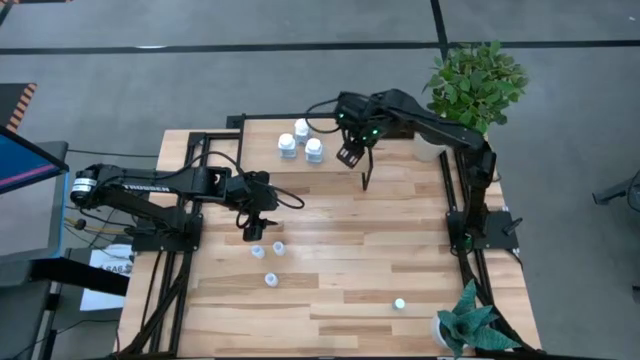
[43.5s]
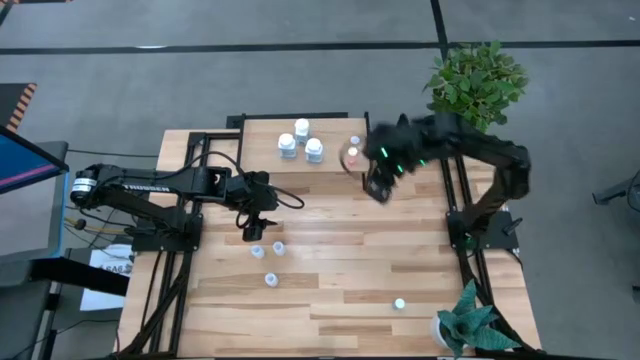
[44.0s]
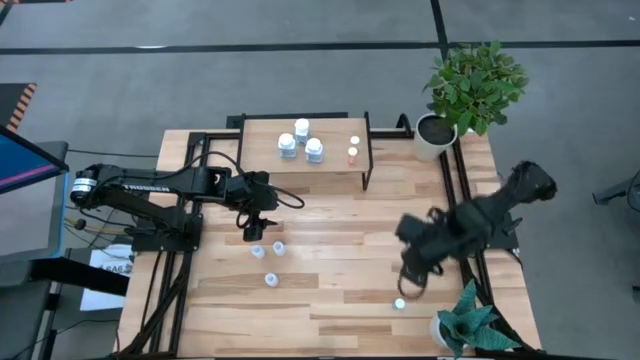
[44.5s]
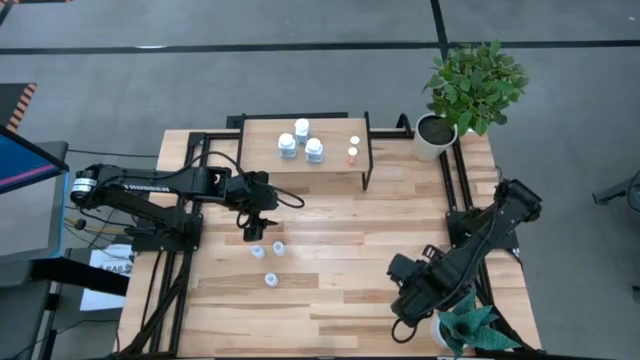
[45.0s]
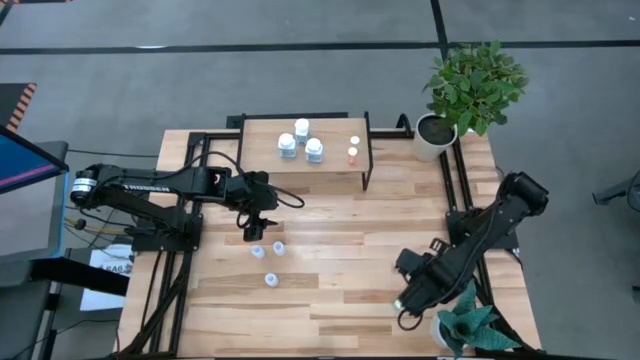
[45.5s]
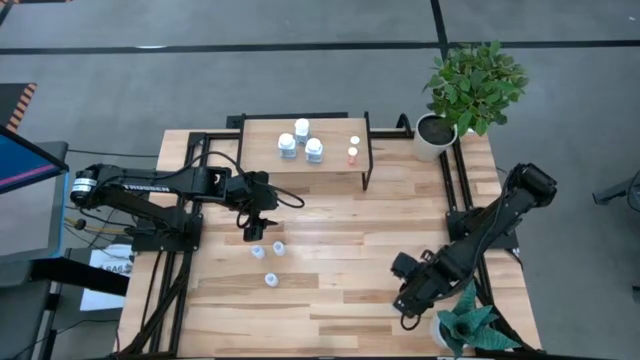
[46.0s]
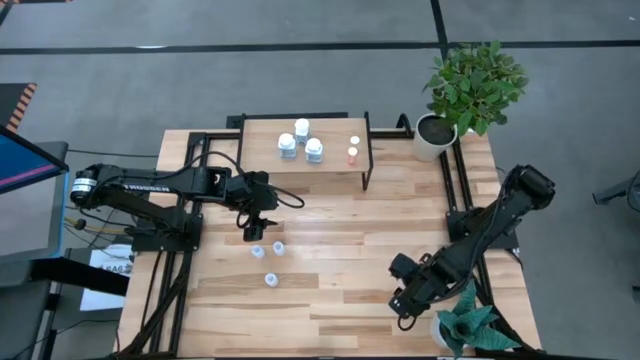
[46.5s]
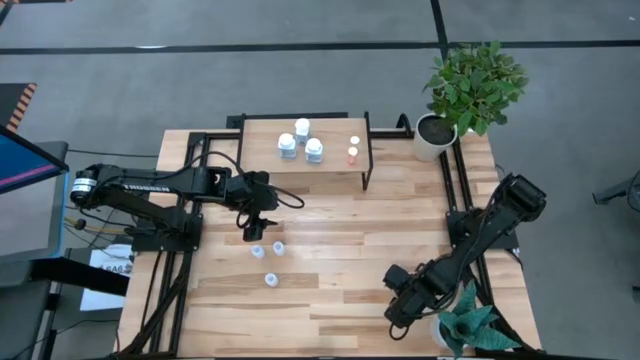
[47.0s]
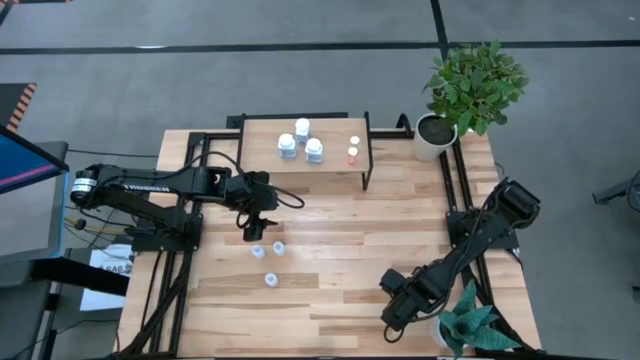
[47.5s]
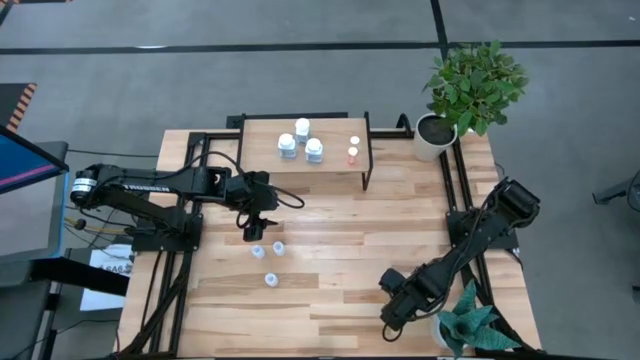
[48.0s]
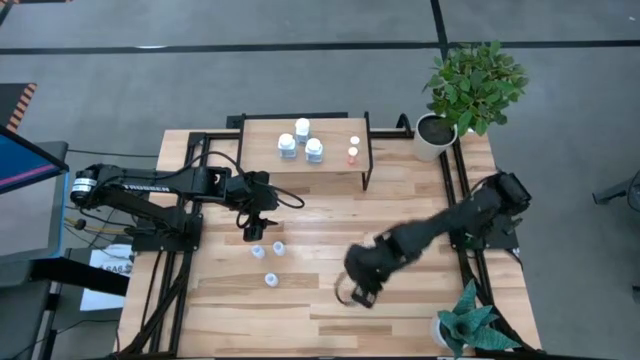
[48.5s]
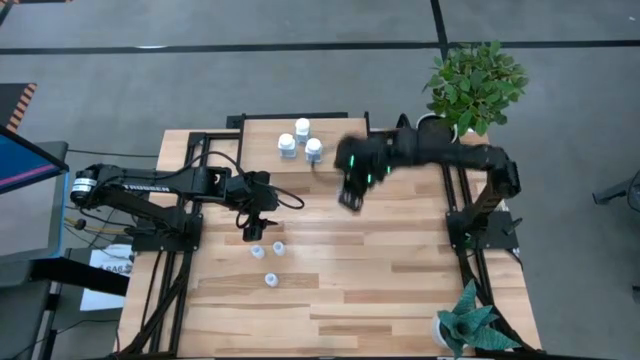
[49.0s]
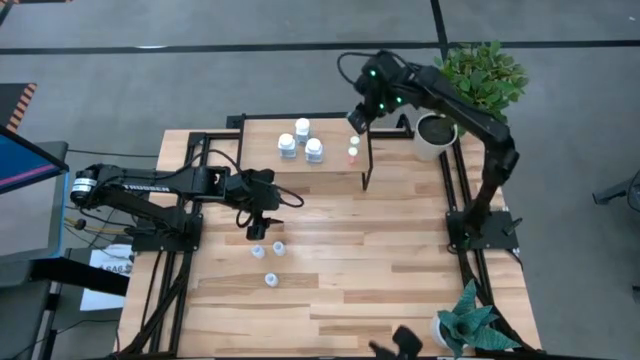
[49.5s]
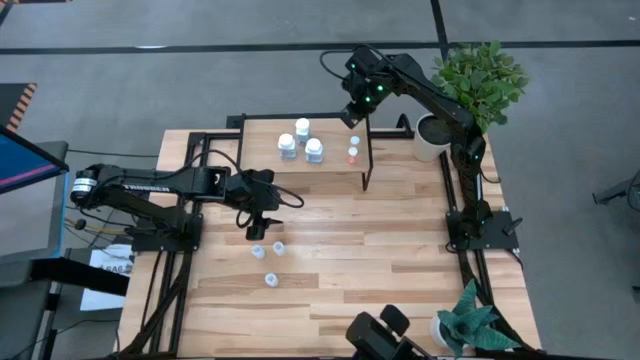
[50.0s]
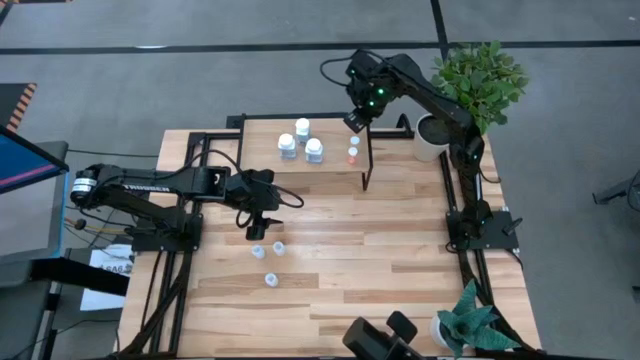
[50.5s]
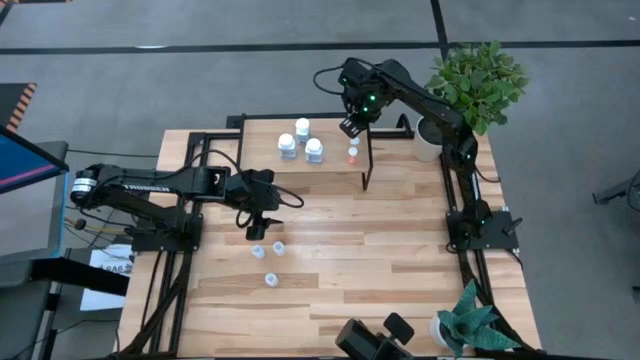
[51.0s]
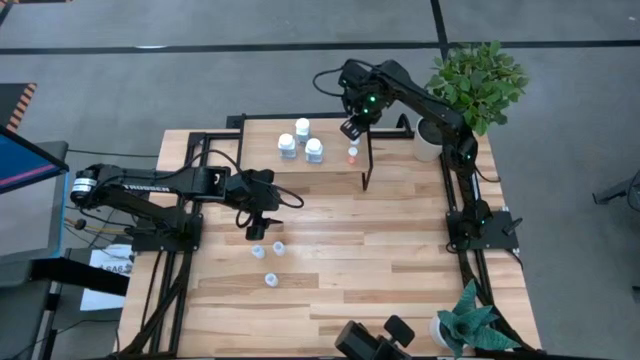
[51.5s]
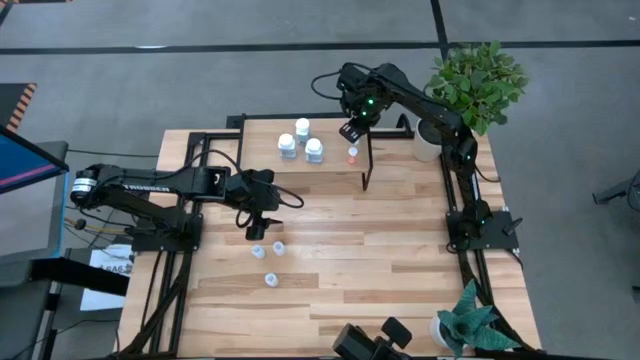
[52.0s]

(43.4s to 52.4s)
Task: Pick and place medicine bottles onto shelf by color
Put the blue pill bottle on the shelf

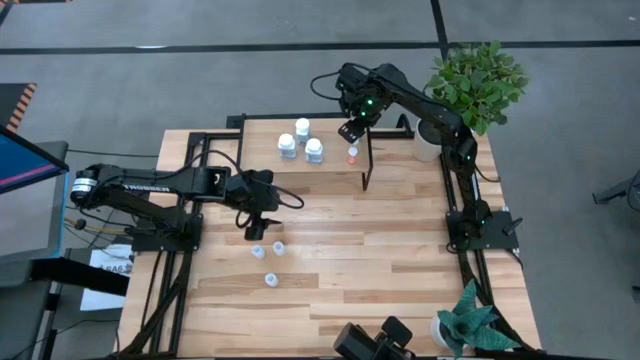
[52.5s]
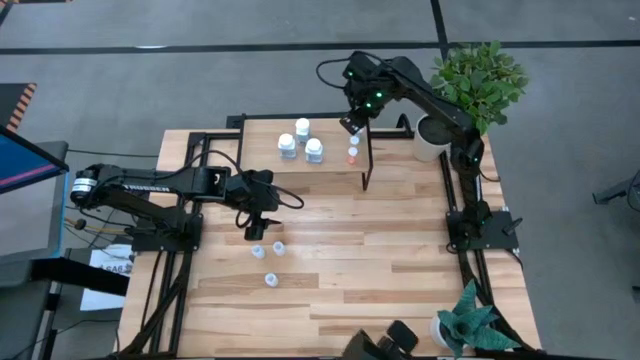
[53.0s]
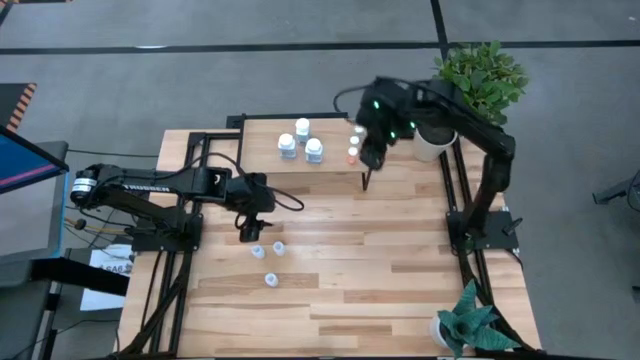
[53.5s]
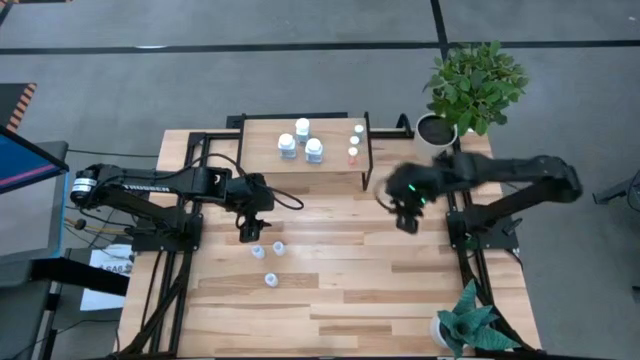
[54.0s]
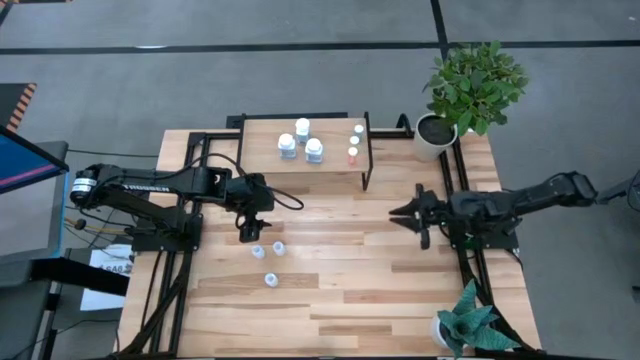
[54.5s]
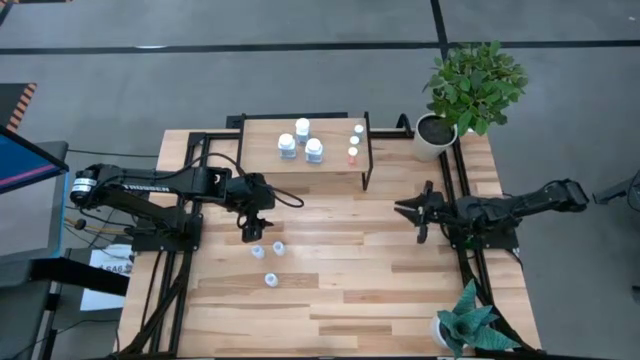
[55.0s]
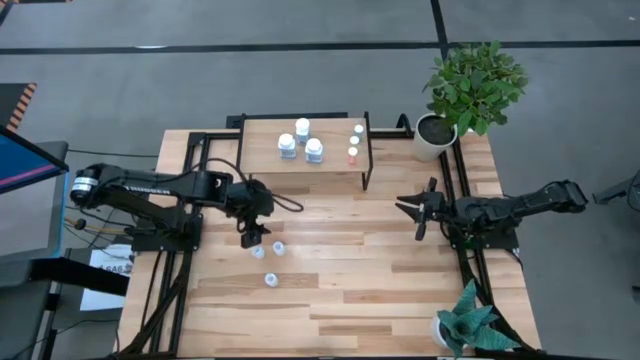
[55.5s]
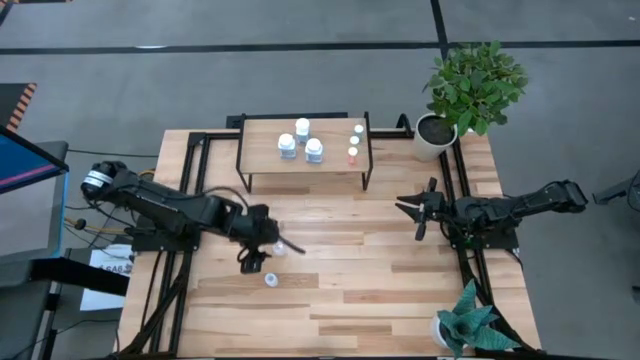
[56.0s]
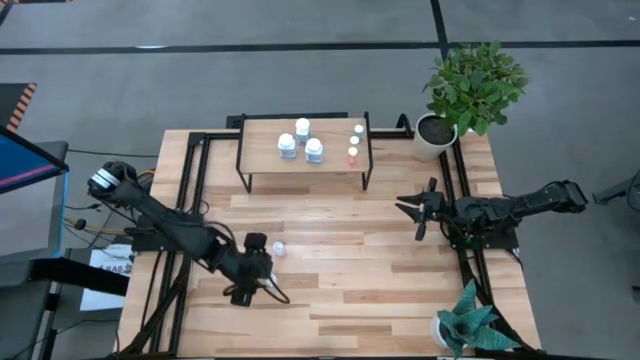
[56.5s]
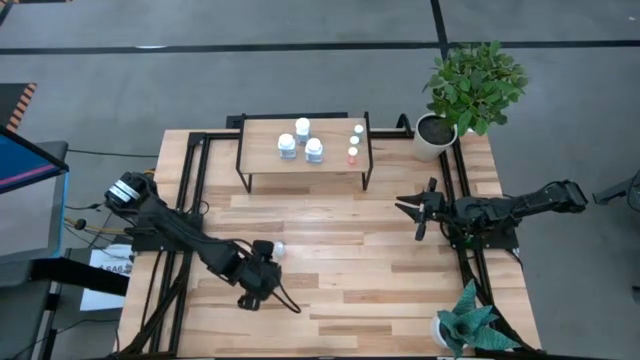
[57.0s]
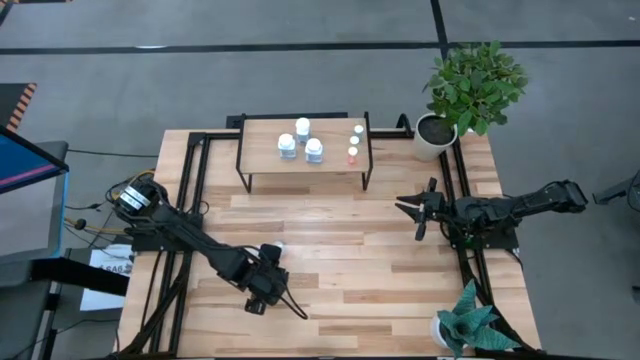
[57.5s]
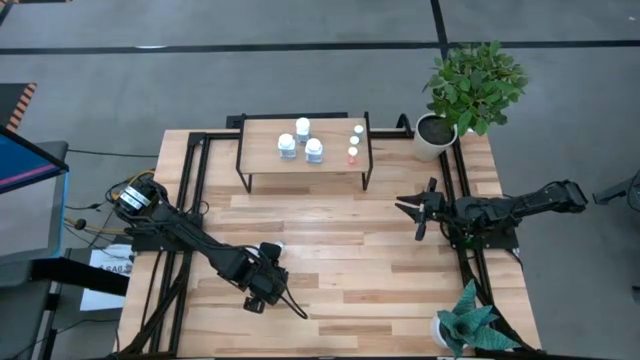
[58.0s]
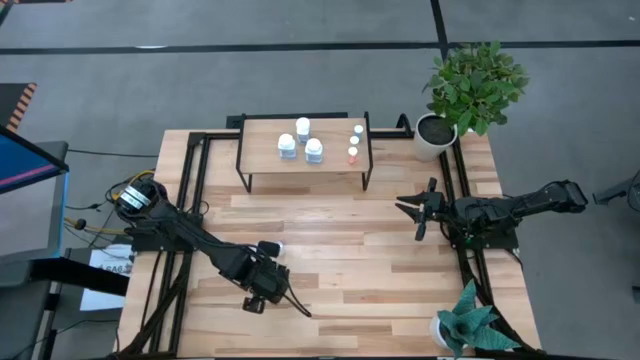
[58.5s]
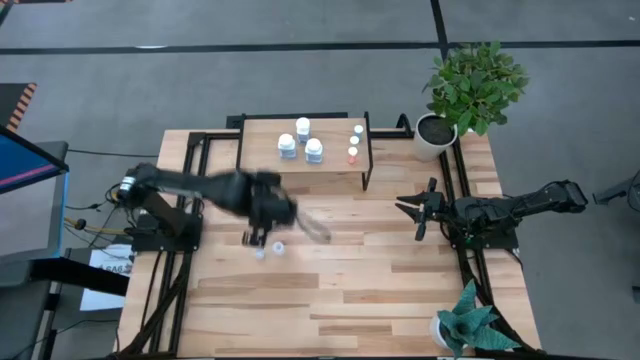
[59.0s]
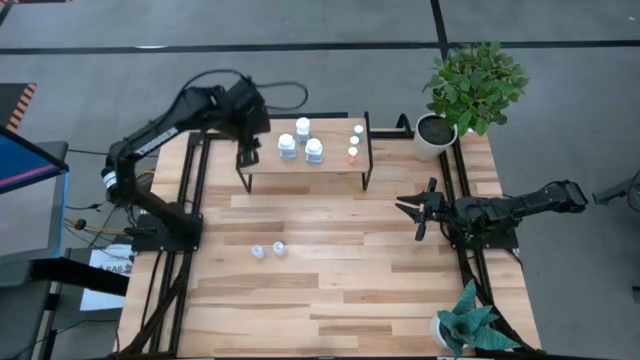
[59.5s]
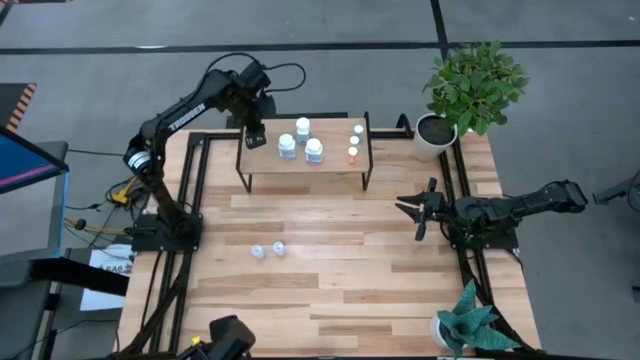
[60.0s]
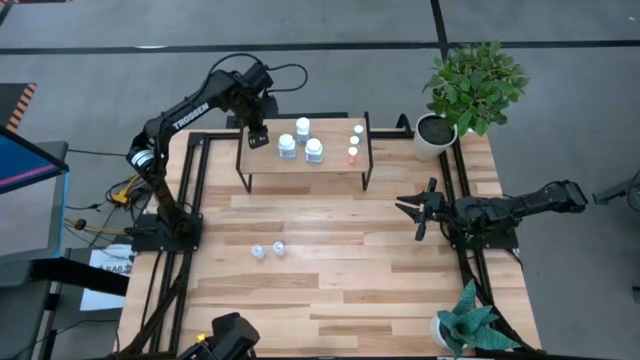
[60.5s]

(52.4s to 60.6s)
Put the bottom transparent pill bottle on the shelf

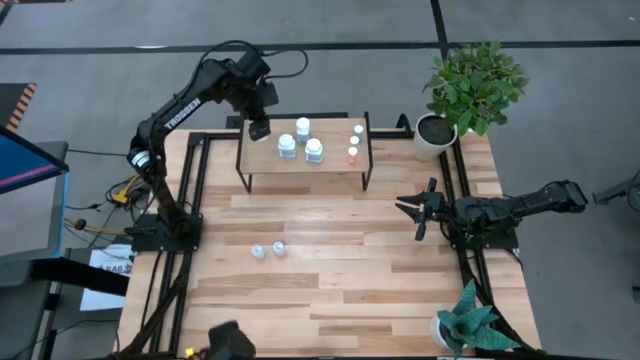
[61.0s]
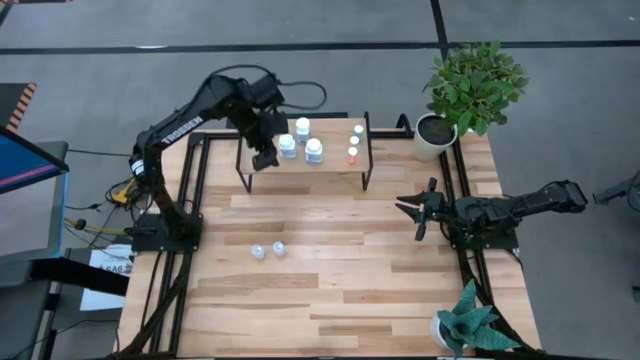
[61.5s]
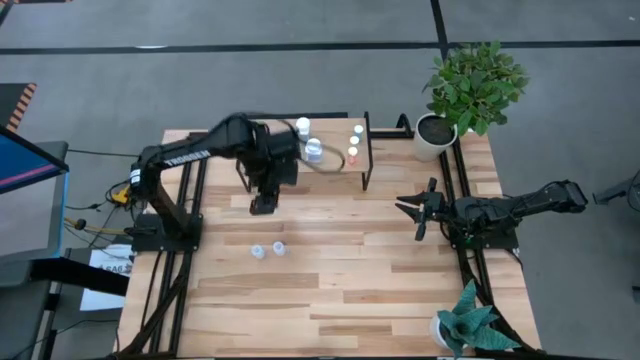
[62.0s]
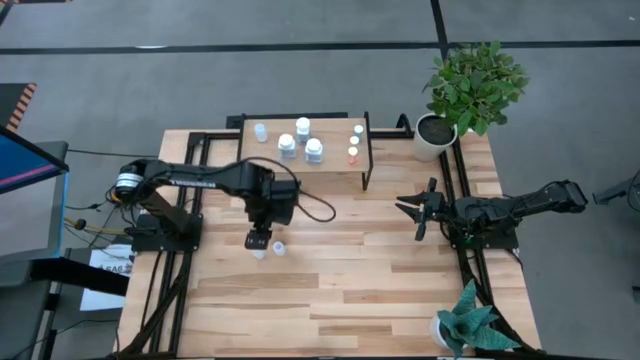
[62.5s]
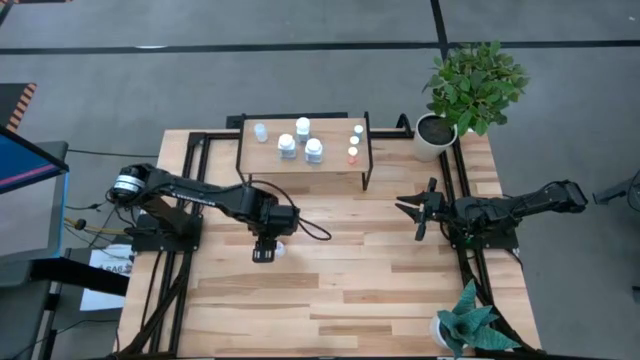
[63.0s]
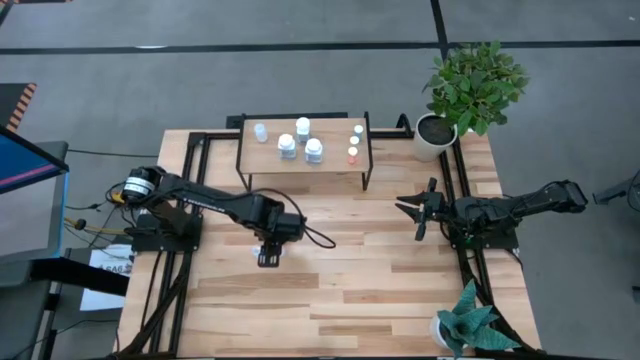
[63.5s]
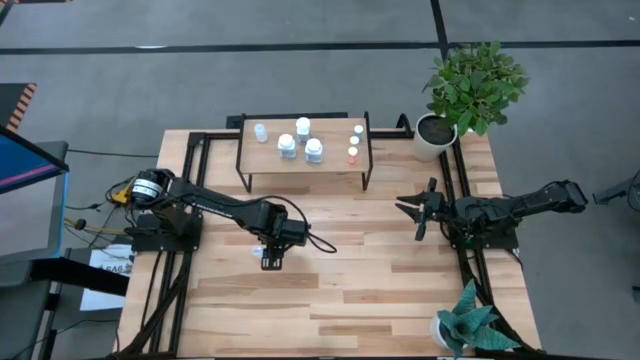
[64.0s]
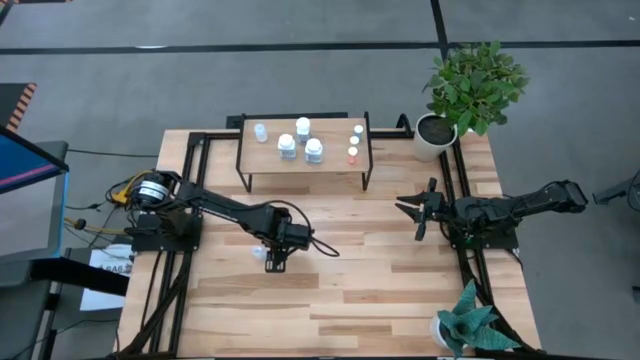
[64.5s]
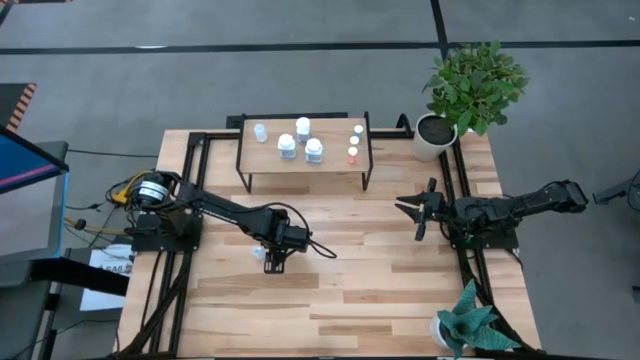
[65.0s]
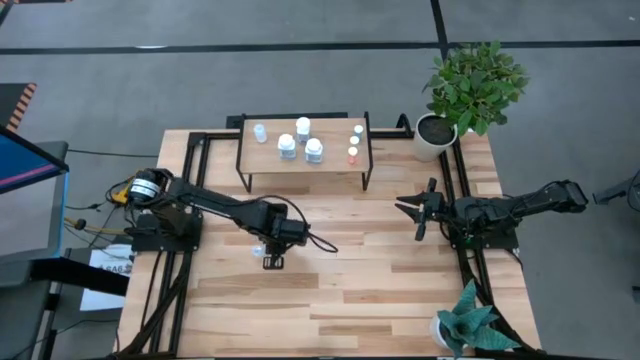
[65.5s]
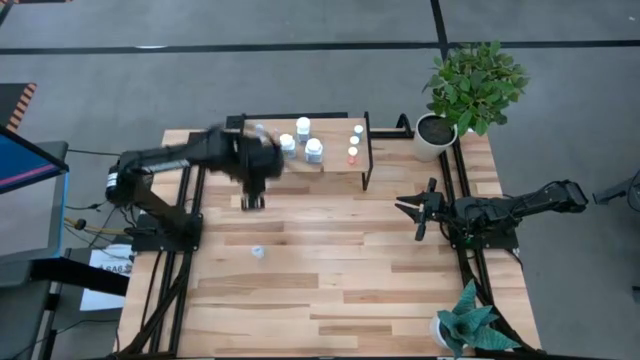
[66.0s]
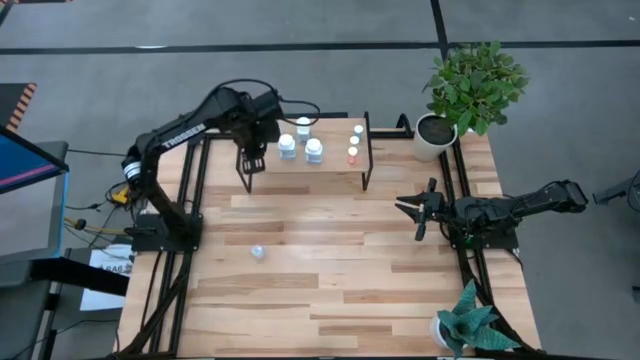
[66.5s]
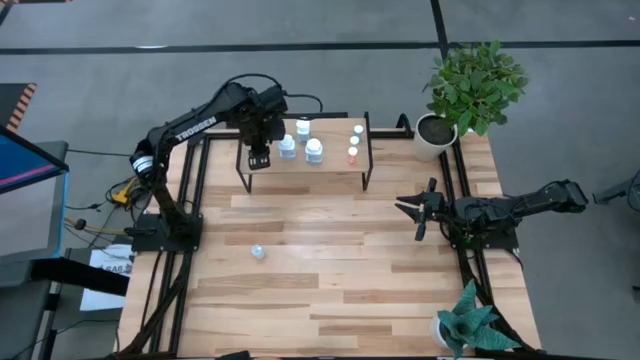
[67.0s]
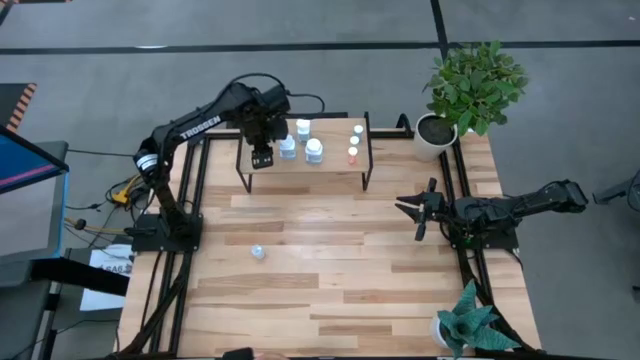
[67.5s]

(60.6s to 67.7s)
Put the right transparent pill bottle on the shelf
